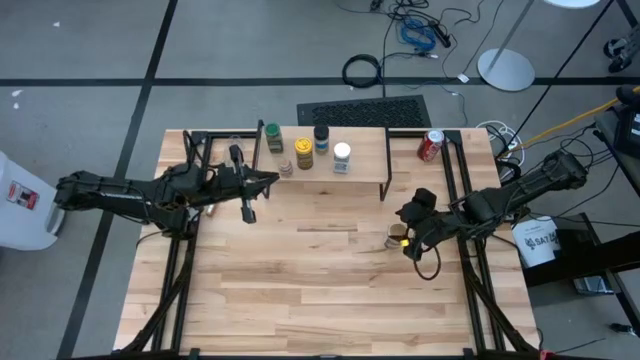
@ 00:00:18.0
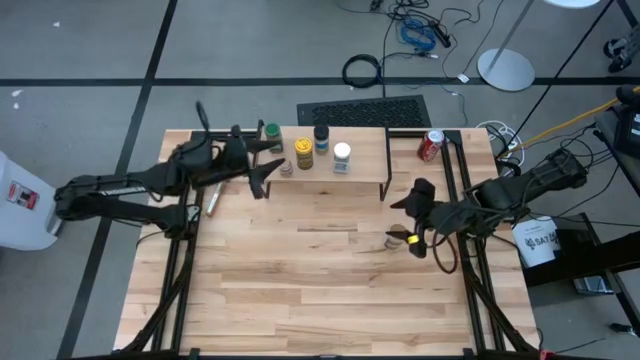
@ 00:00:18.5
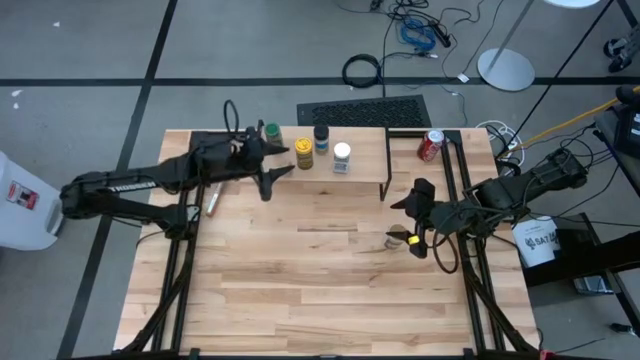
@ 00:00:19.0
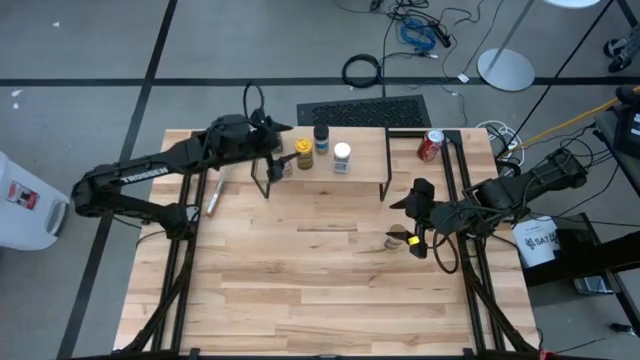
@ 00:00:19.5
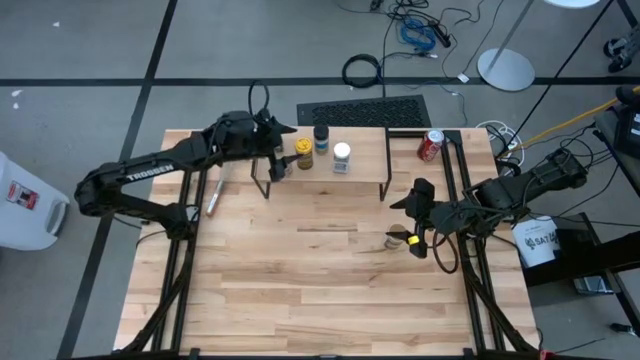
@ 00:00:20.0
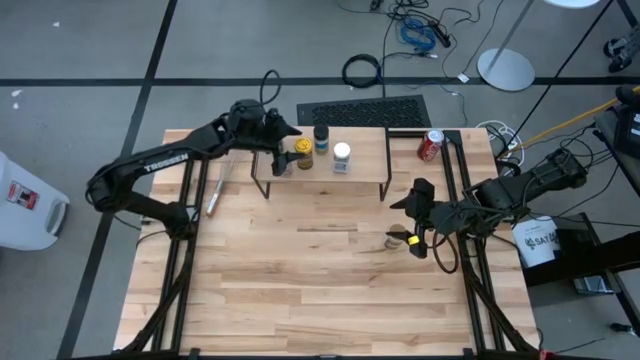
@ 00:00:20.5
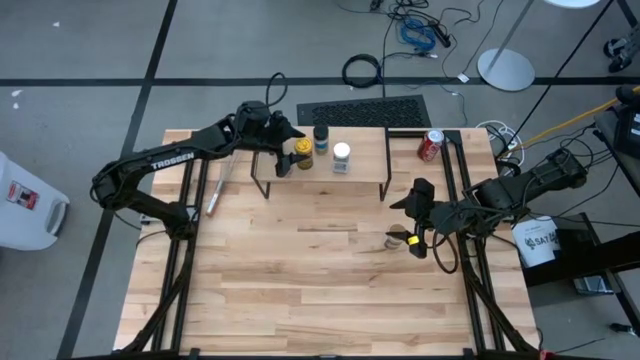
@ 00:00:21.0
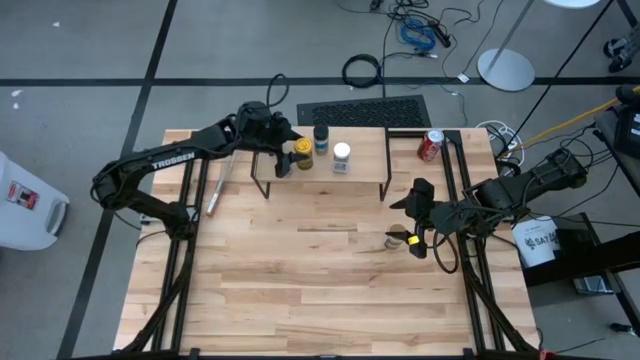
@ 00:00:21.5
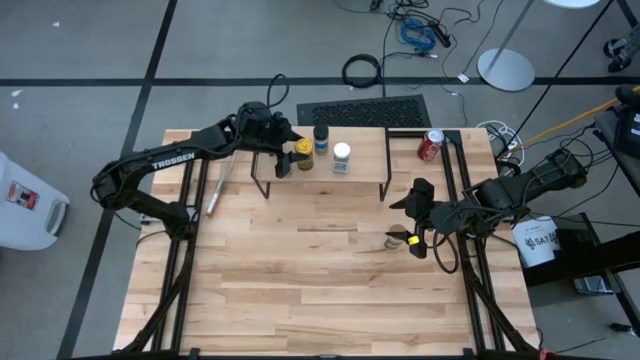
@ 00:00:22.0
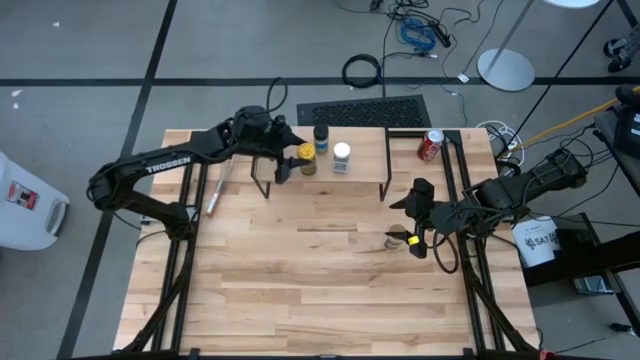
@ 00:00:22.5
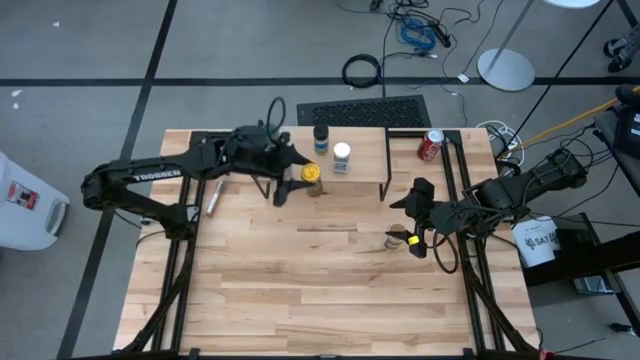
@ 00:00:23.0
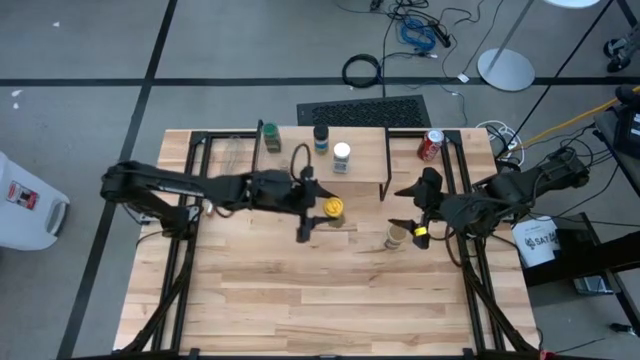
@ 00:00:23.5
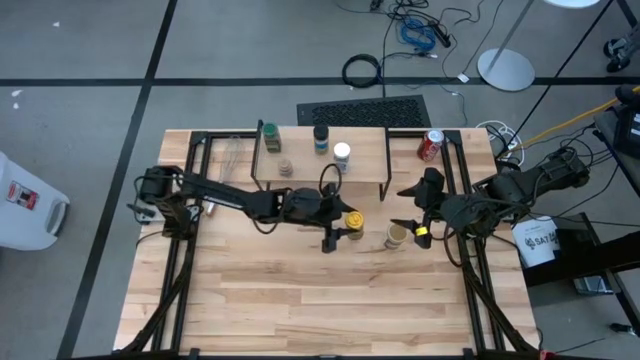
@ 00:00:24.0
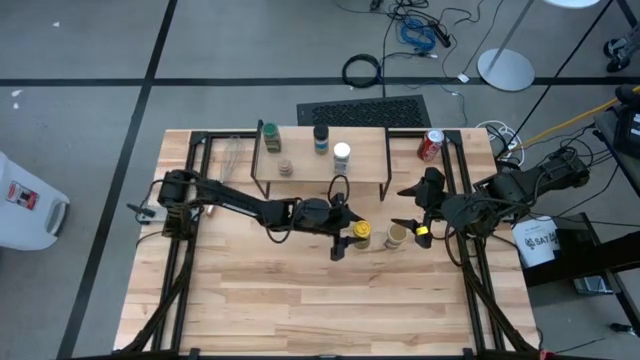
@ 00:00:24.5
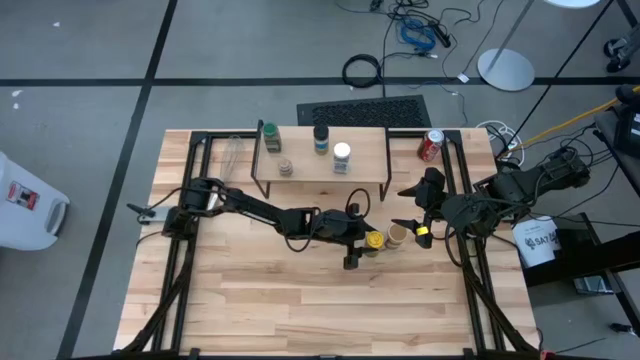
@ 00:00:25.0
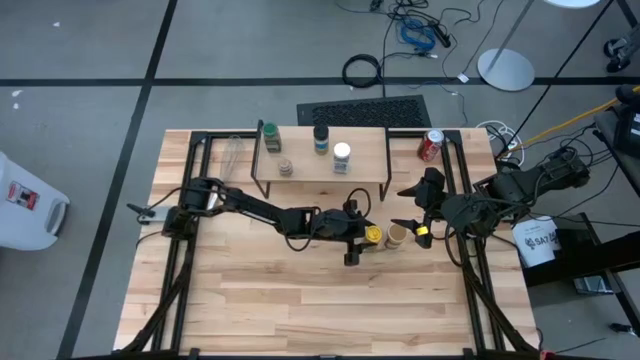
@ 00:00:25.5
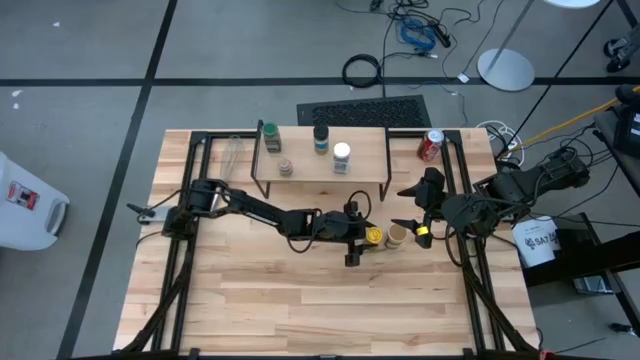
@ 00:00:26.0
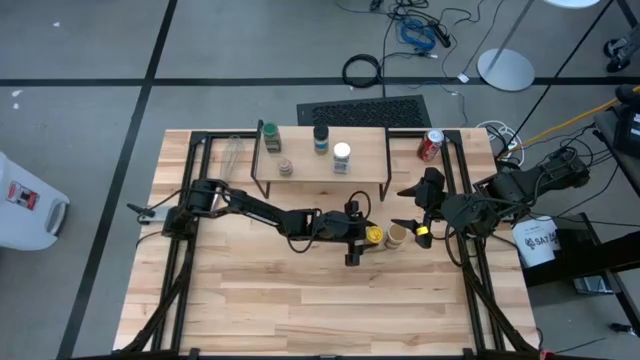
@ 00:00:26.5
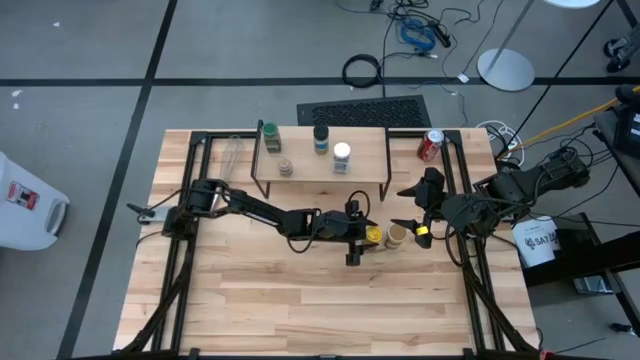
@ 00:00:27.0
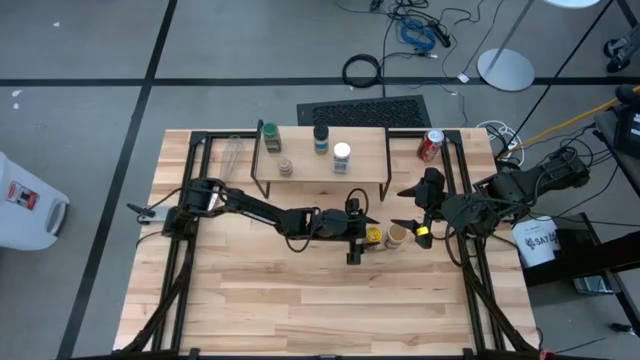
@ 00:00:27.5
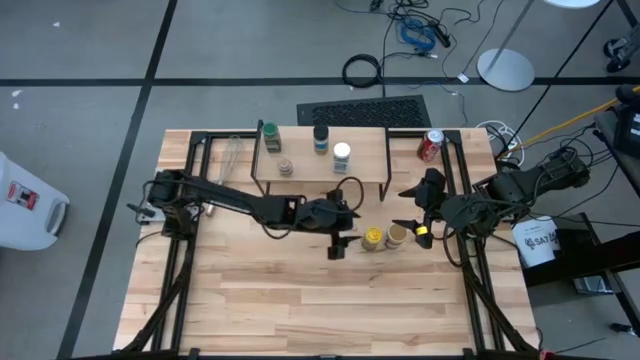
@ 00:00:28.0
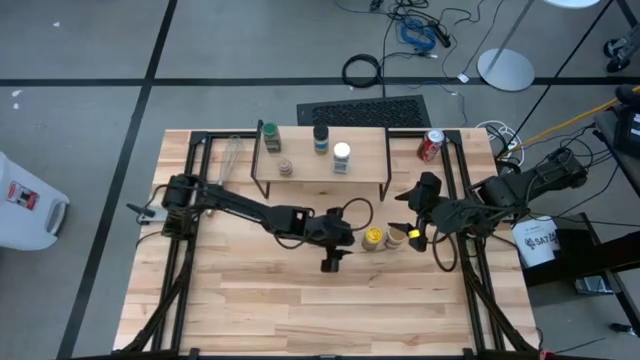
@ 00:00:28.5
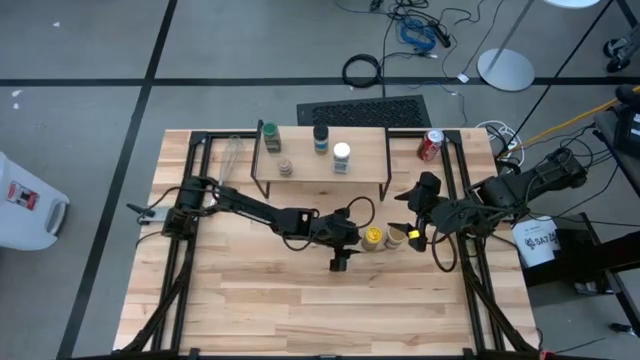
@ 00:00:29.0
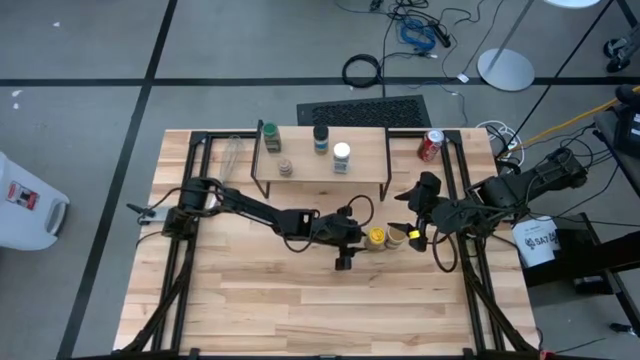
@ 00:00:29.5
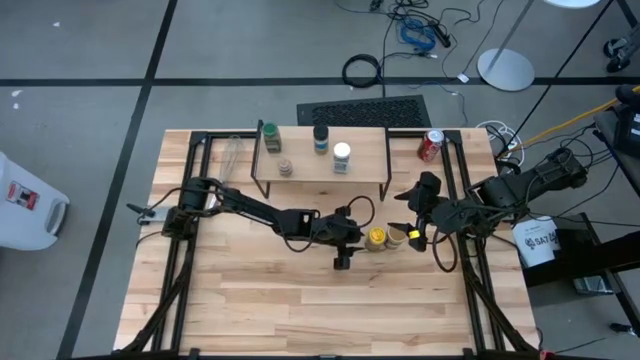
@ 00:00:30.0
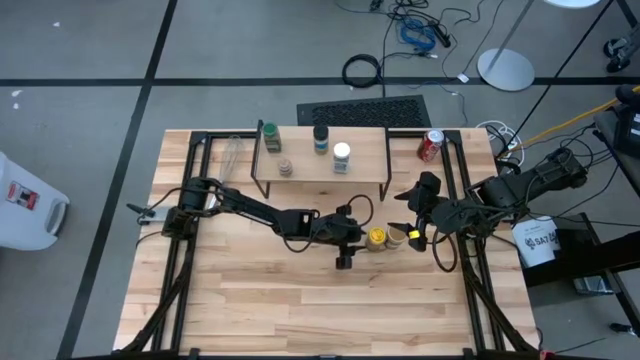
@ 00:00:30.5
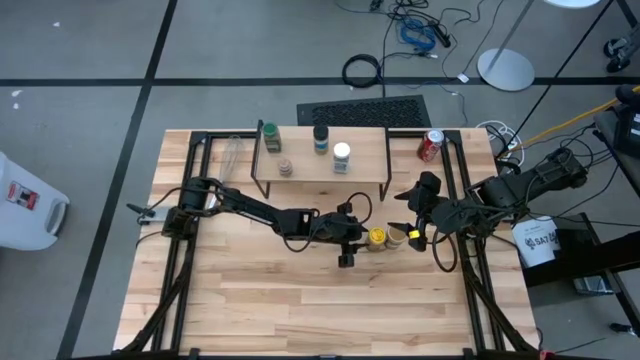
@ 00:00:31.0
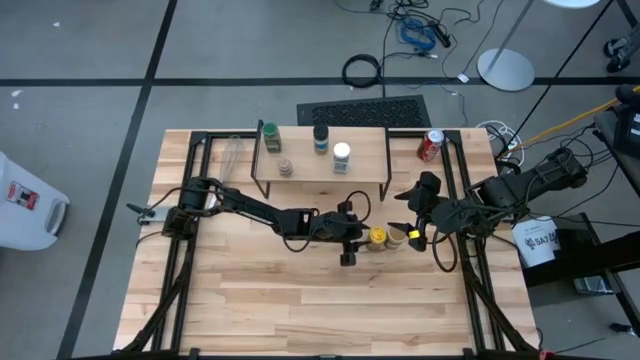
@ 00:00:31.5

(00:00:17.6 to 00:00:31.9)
Task: Shelf spices
Remove the yellow seasoning bottle from the shelf

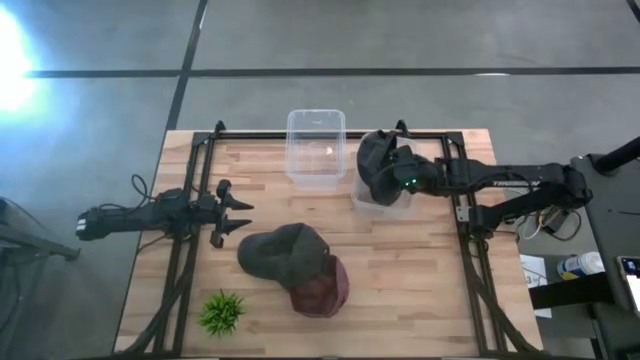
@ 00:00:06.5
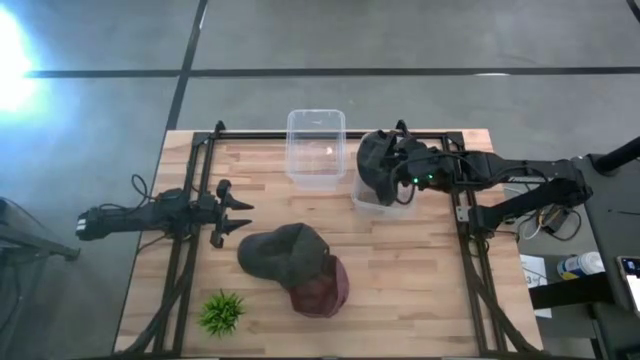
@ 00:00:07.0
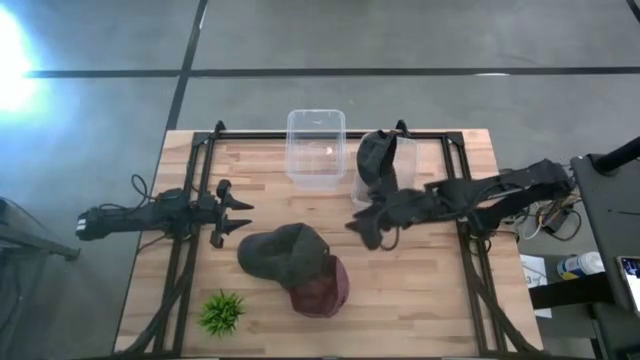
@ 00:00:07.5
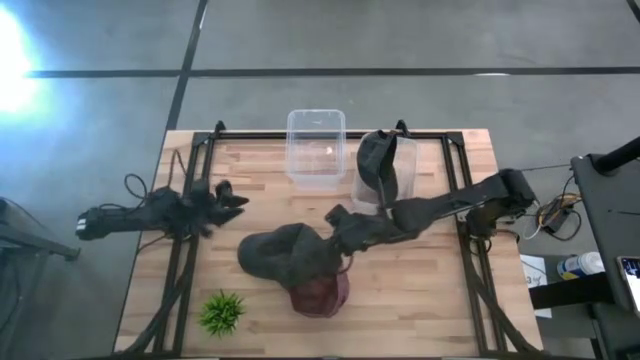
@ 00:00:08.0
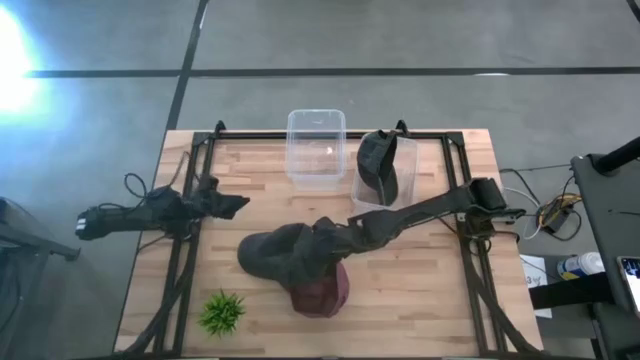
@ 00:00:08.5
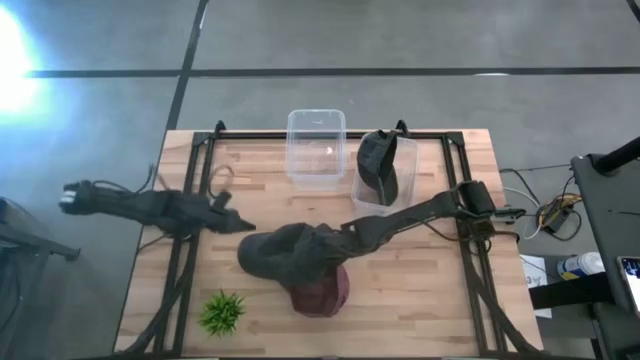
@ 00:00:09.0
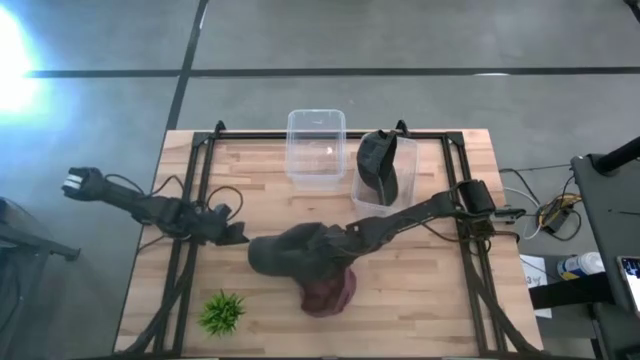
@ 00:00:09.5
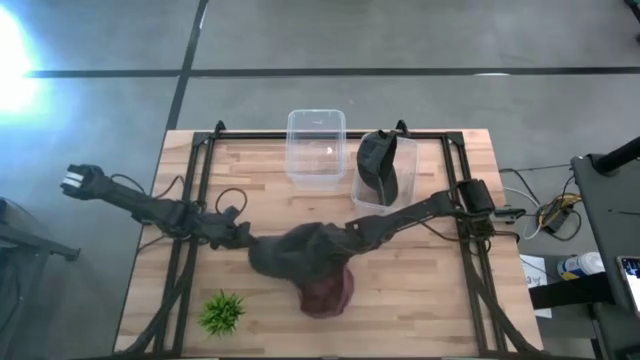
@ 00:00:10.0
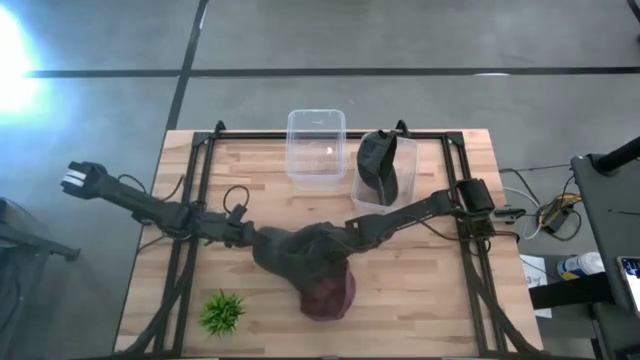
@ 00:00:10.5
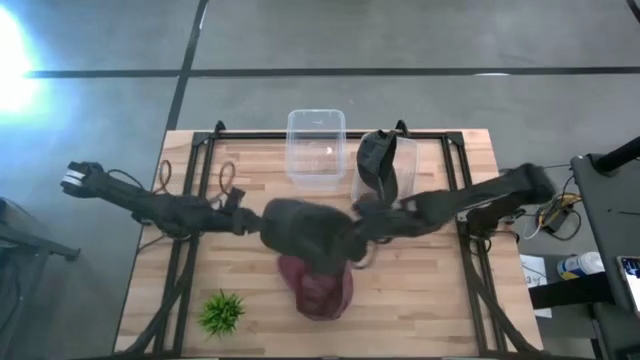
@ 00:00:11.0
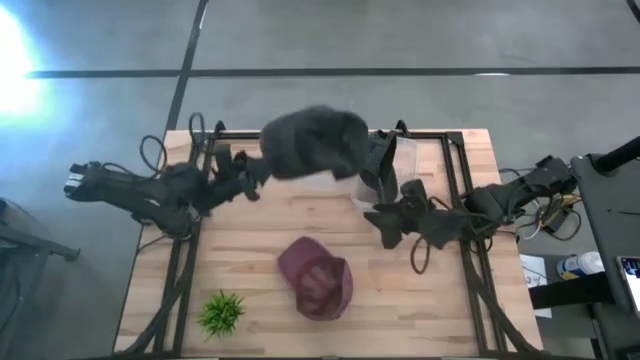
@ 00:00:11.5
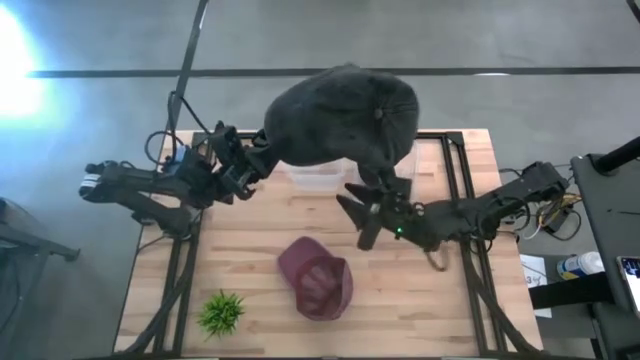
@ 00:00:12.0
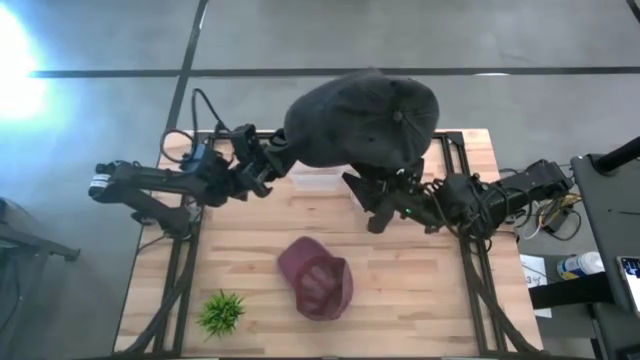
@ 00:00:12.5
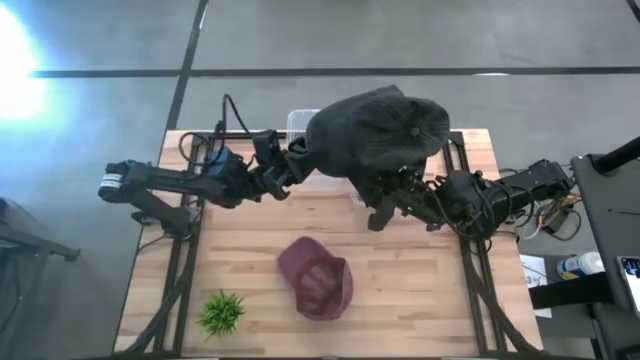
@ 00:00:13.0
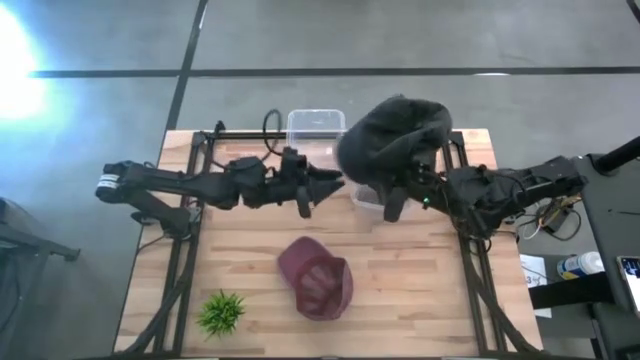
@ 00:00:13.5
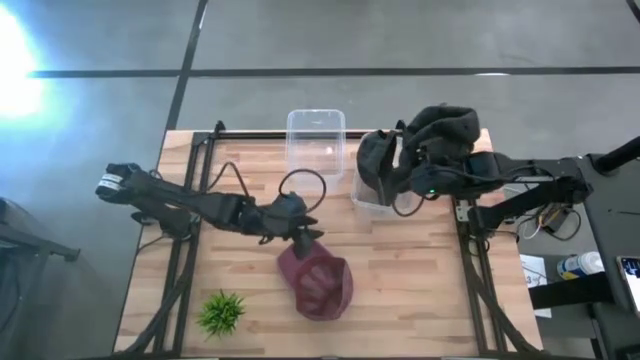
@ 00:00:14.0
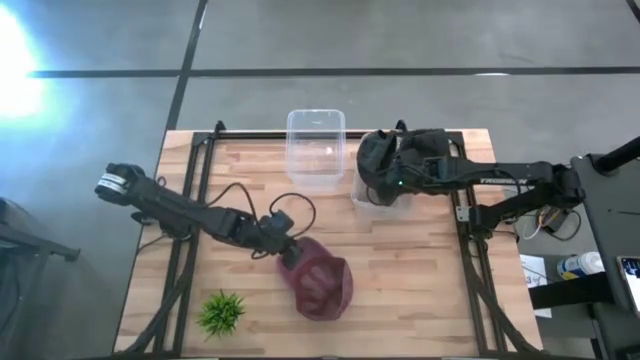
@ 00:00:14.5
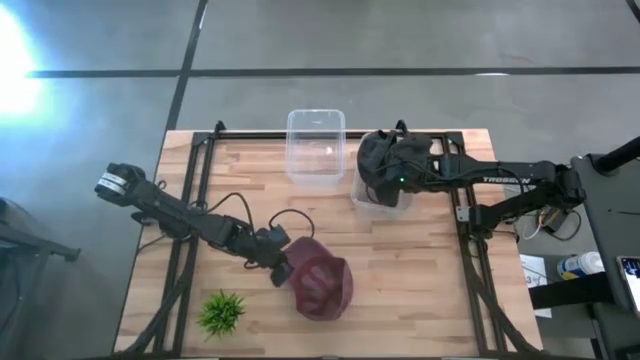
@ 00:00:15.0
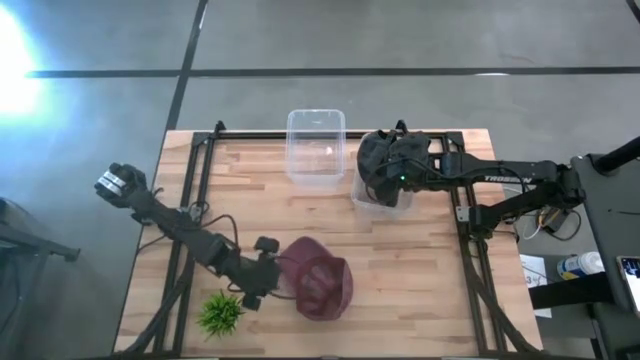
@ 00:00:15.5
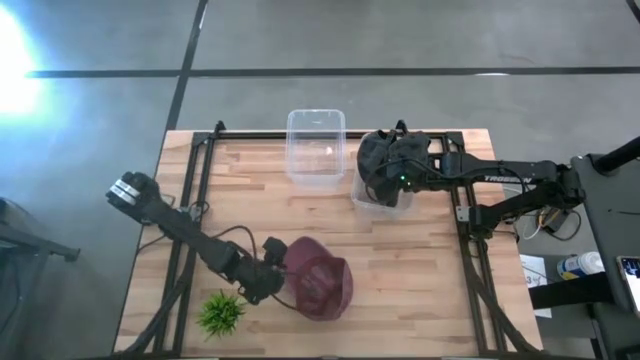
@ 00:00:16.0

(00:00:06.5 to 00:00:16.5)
Task: Pick & Place hat
Put the black cap into the right transparent bin
